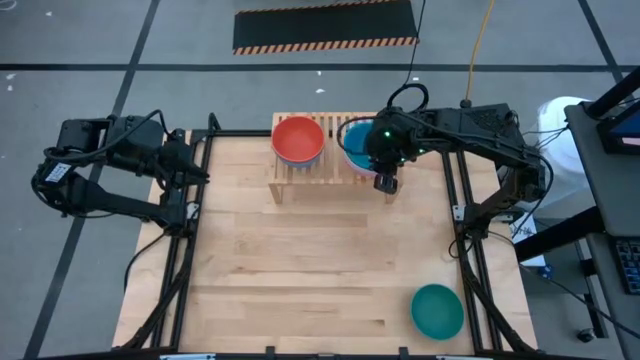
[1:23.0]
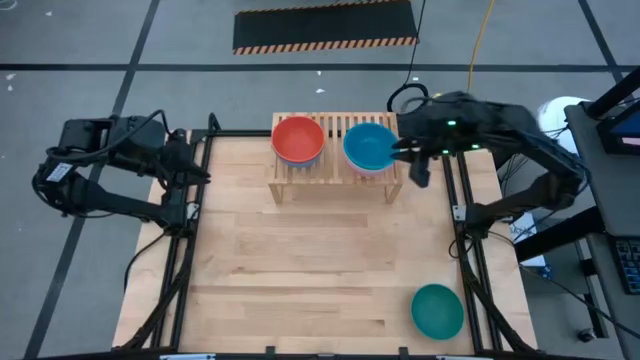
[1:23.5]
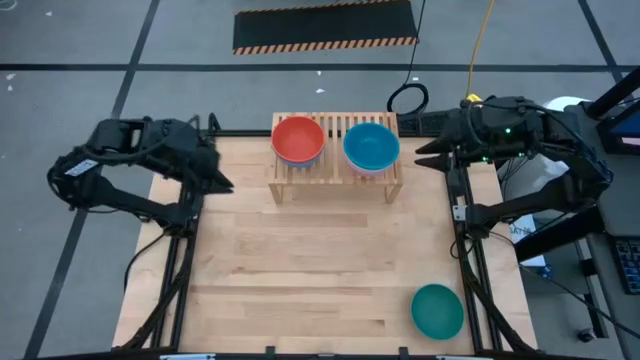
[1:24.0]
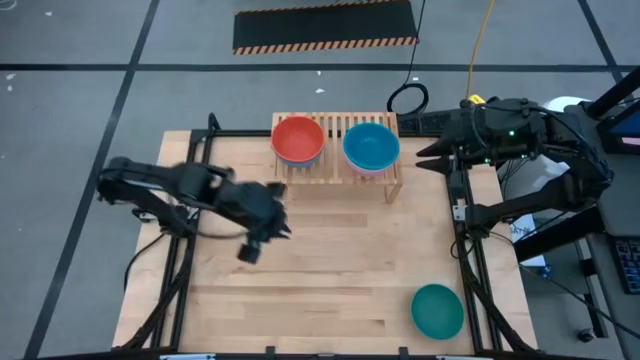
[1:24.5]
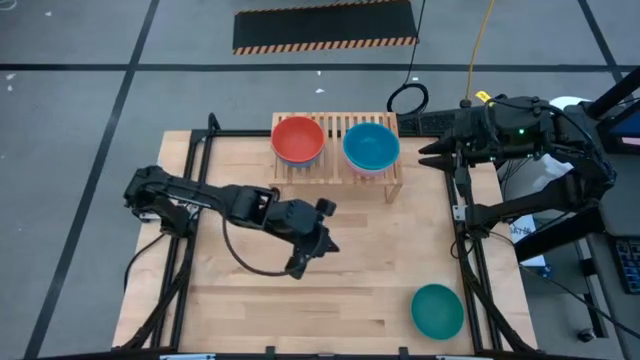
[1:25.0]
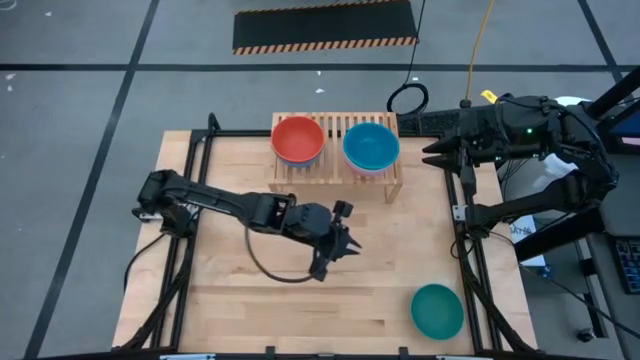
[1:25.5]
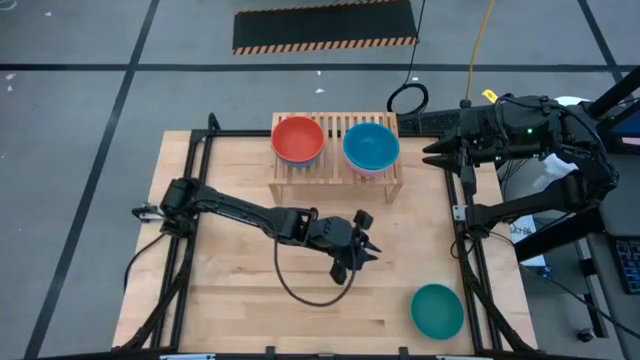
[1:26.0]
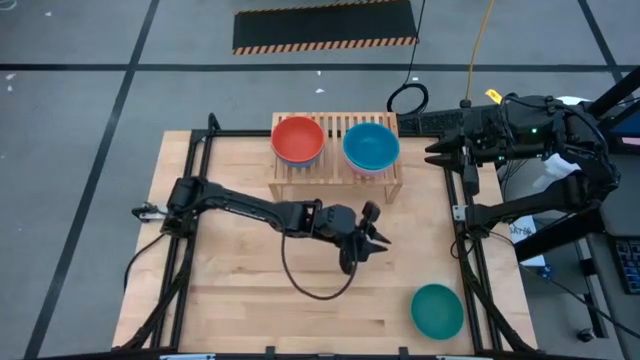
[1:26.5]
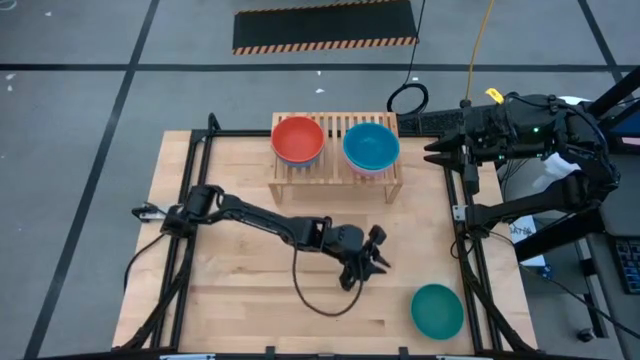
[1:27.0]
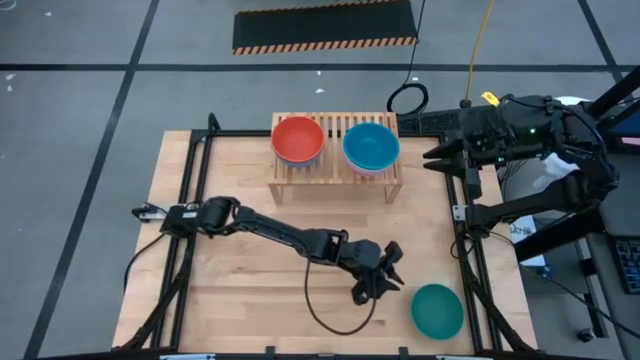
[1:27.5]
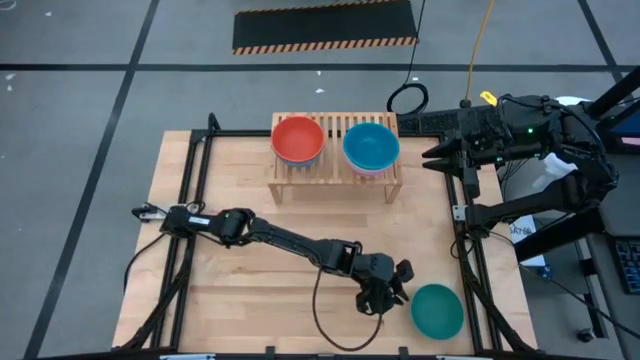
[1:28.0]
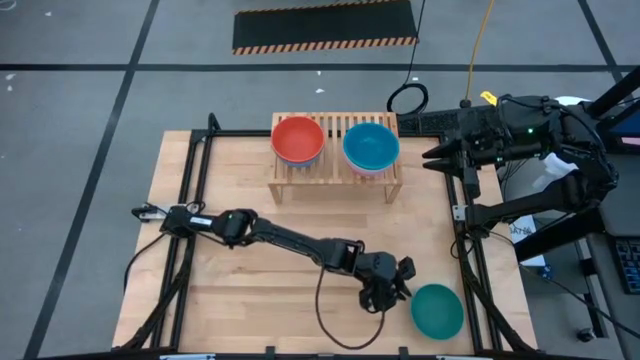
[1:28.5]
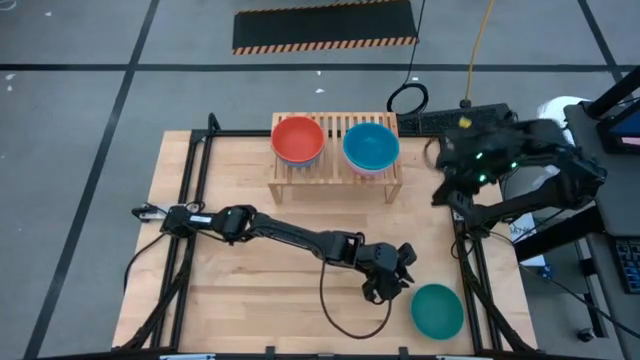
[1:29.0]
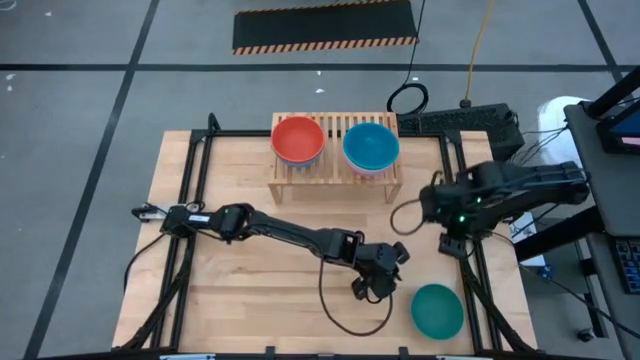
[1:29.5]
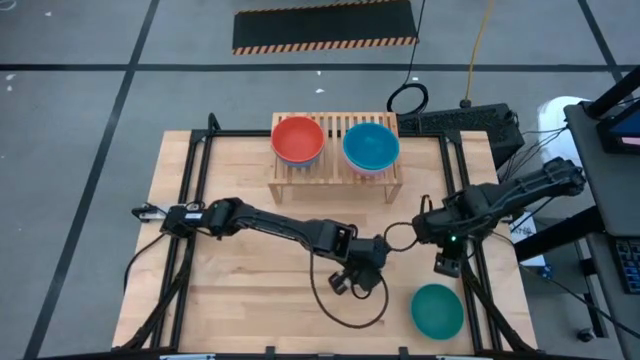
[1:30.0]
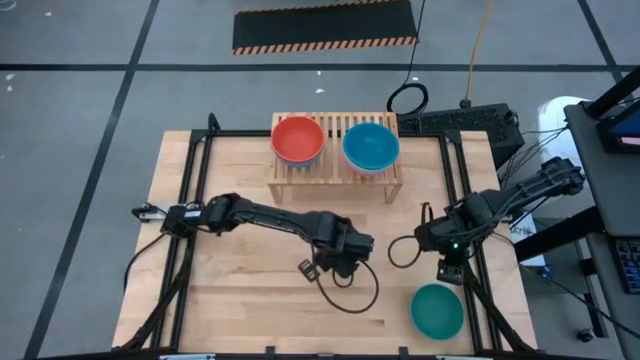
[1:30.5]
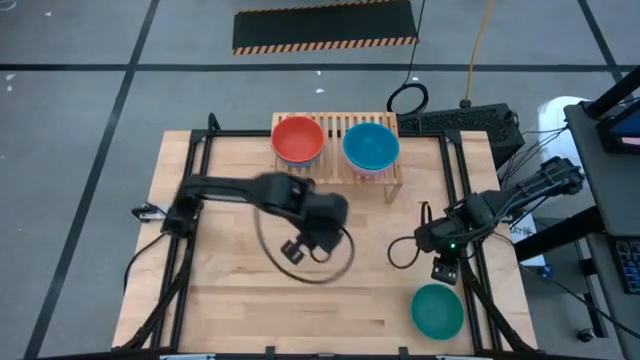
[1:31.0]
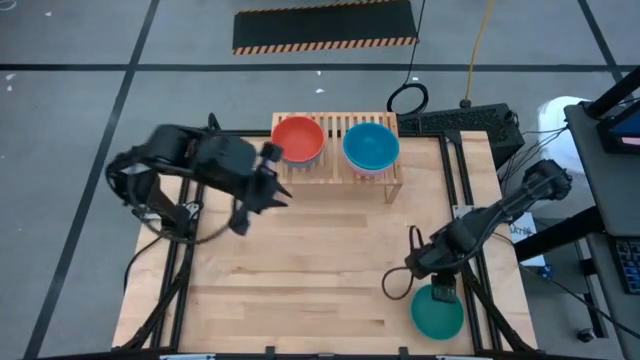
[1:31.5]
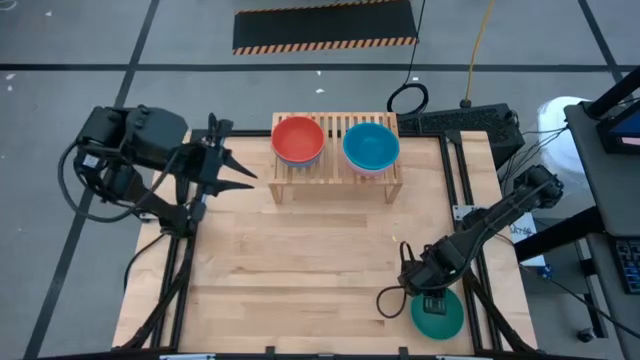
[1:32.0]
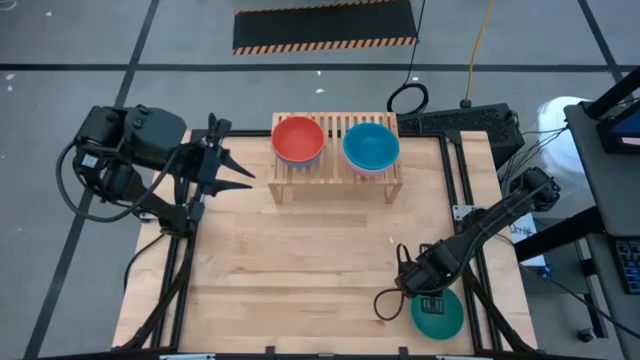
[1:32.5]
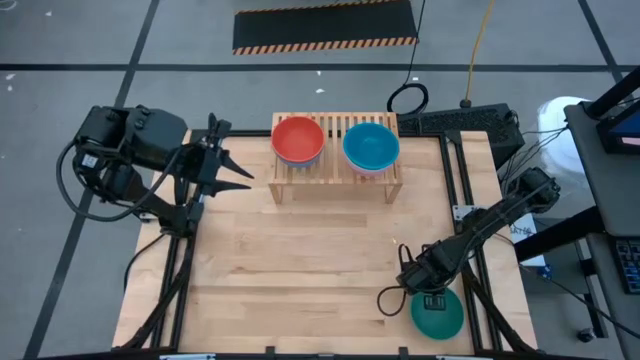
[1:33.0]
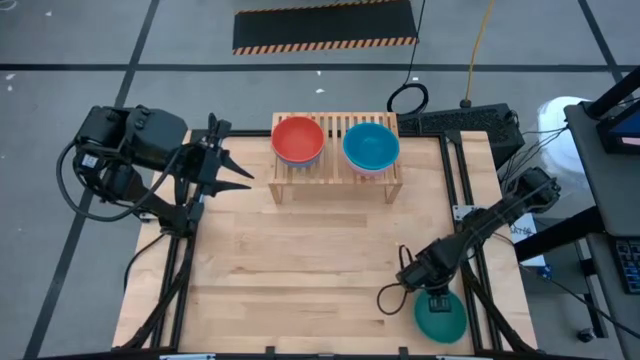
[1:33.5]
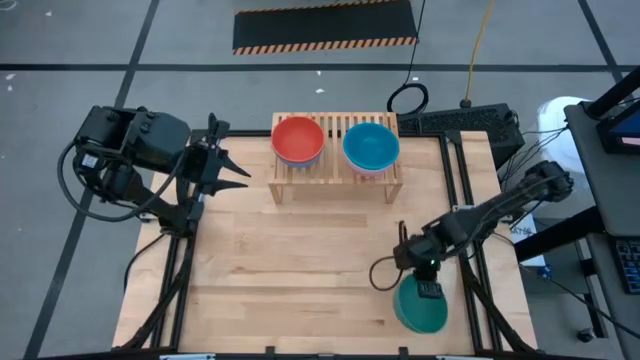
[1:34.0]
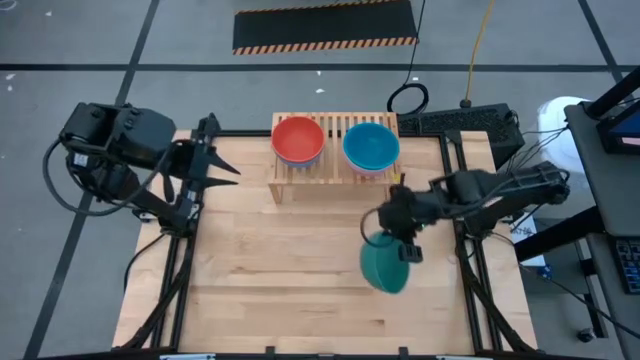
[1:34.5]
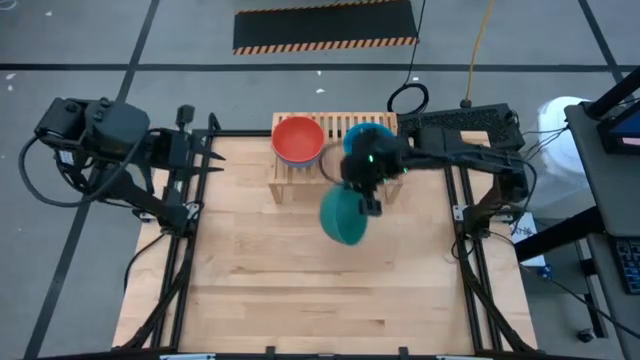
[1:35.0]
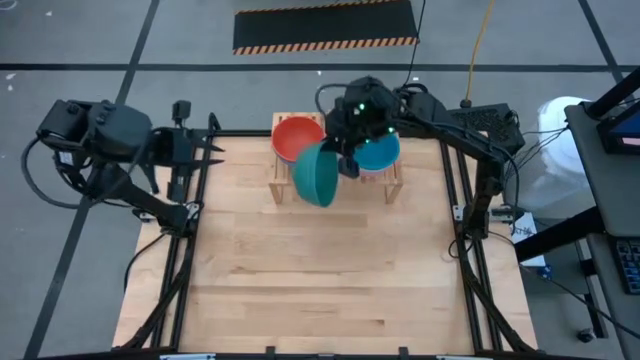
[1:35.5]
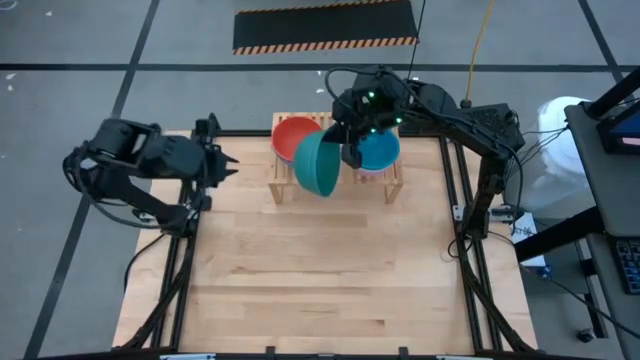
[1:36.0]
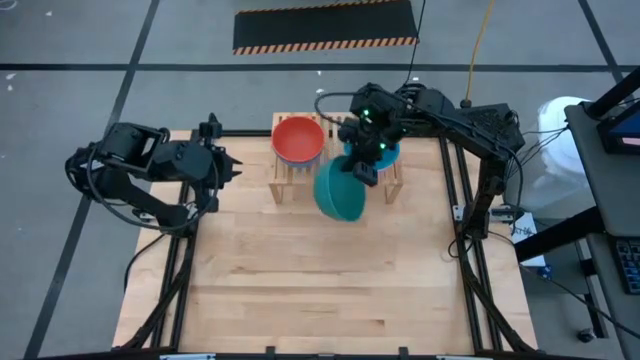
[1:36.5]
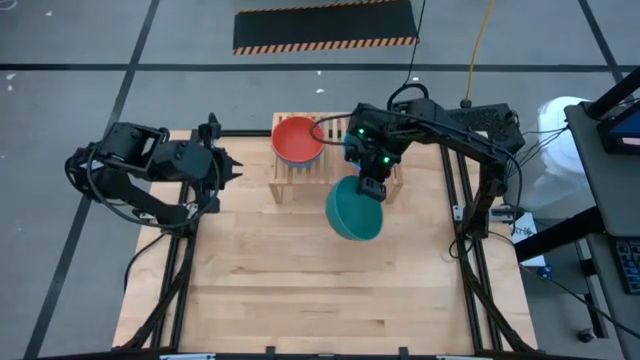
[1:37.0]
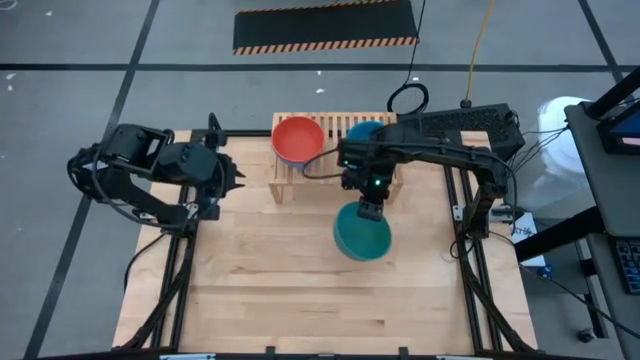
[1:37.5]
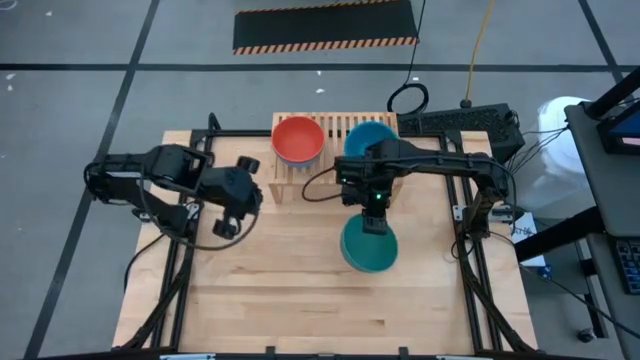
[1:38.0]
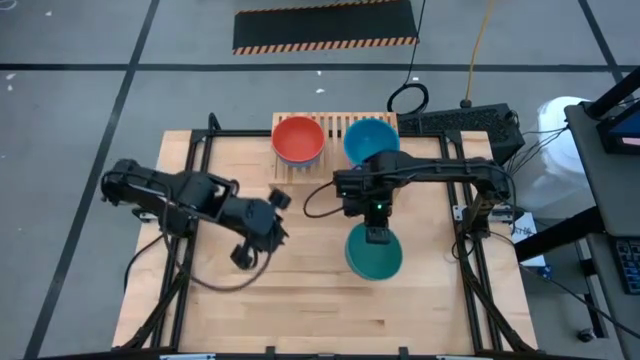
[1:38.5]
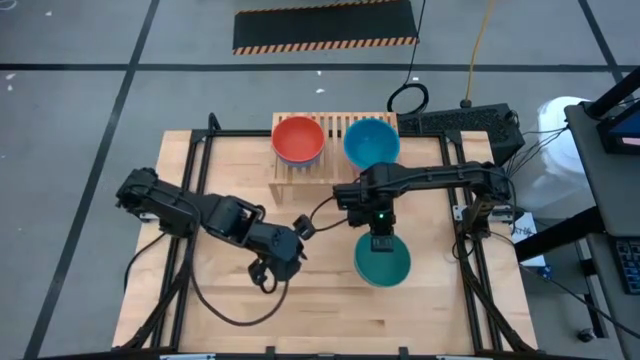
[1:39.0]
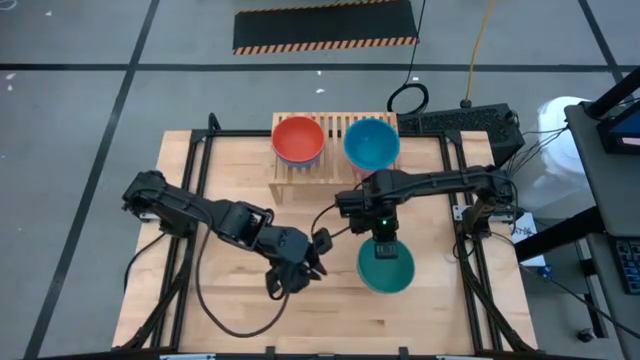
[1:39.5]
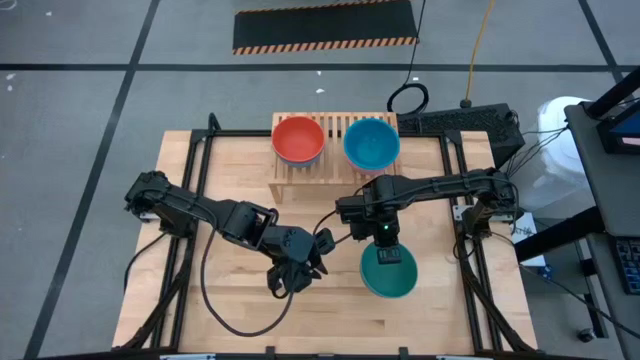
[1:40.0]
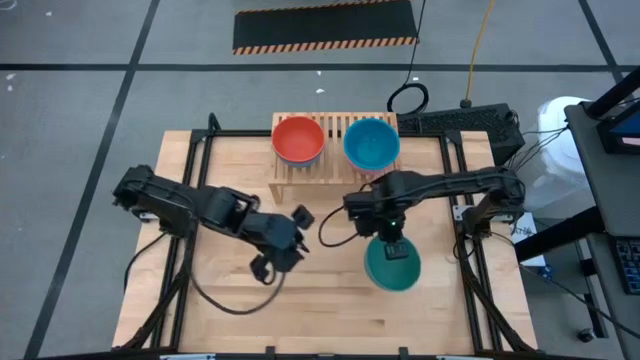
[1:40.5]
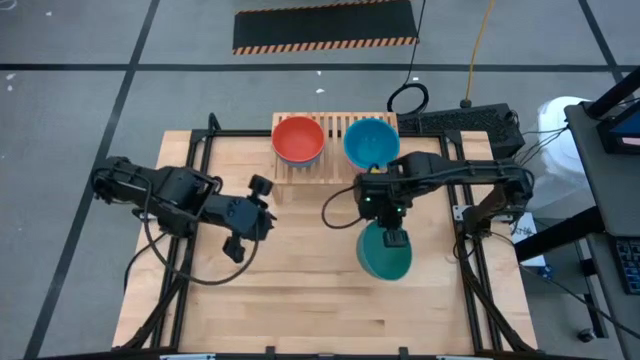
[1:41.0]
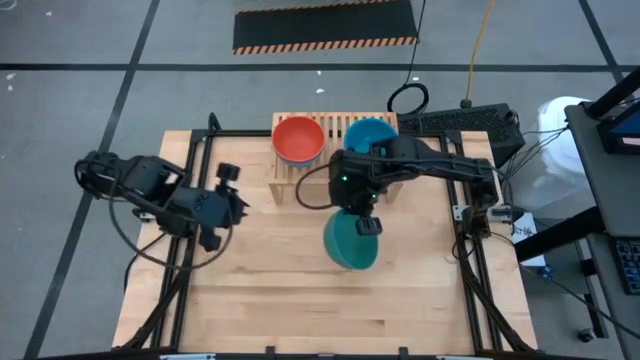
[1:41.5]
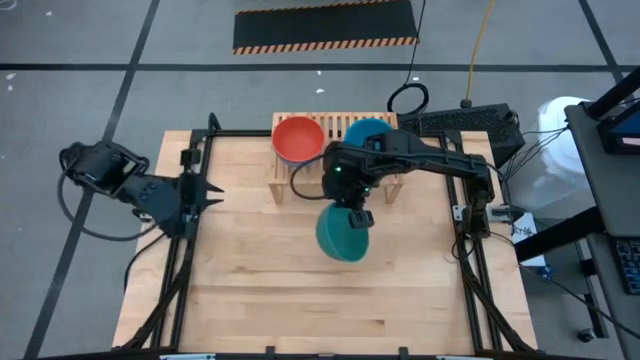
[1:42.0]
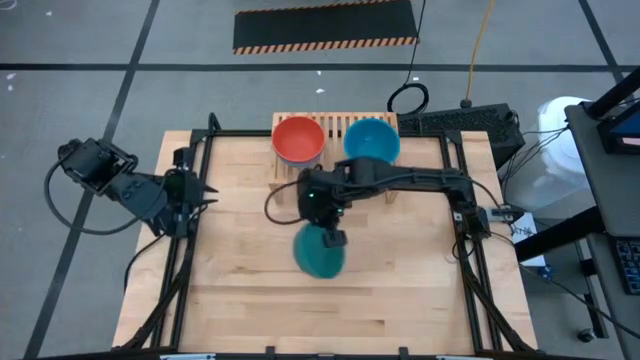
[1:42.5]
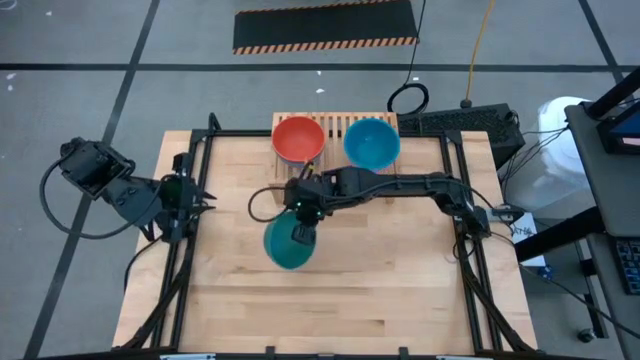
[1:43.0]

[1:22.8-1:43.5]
Task: Place and stack bowls onto a shelf
Stack the green bowl on top of the orange bowl on the shelf
